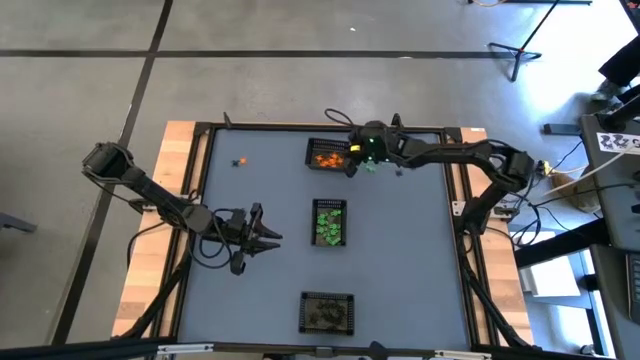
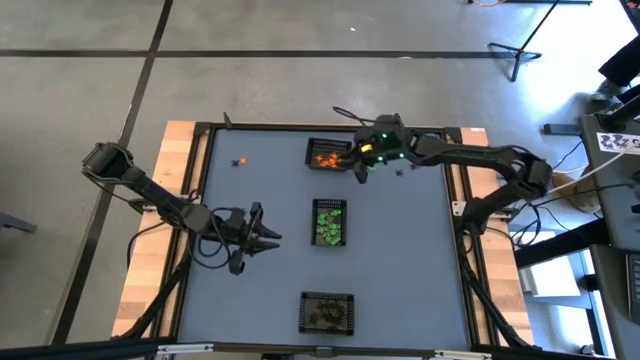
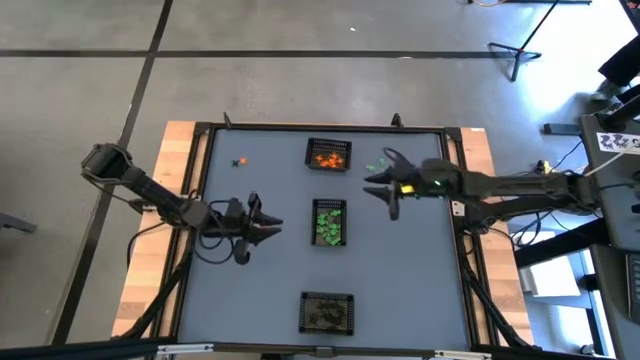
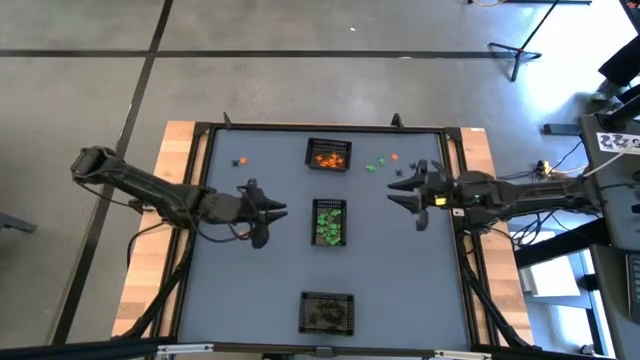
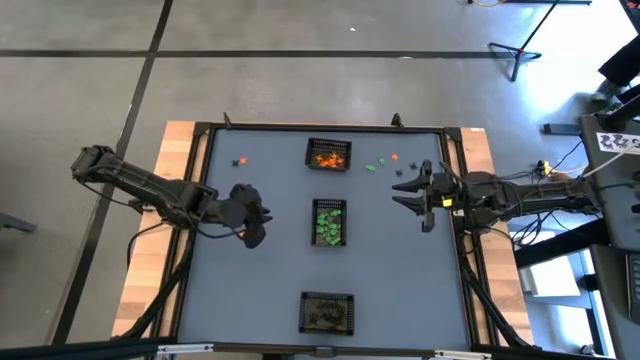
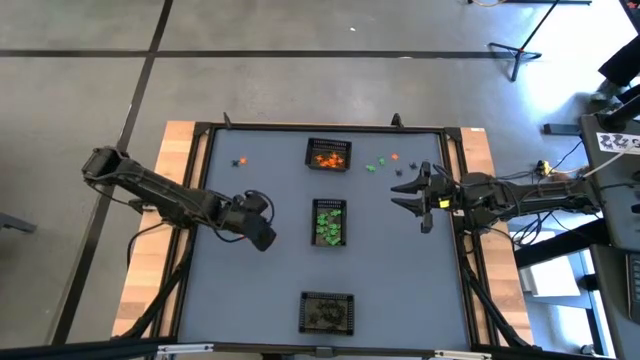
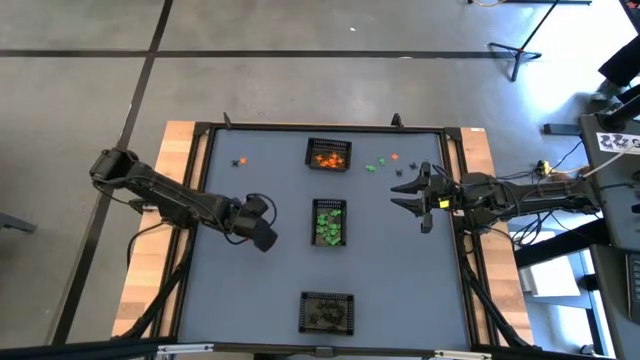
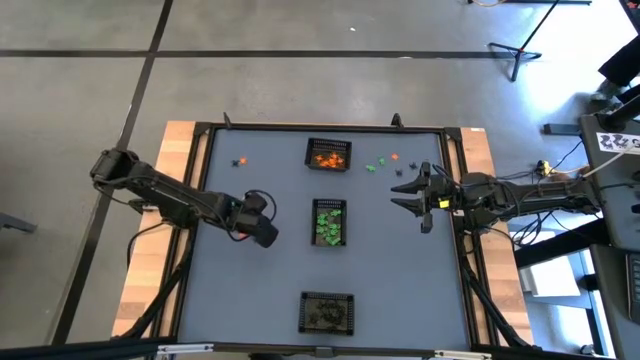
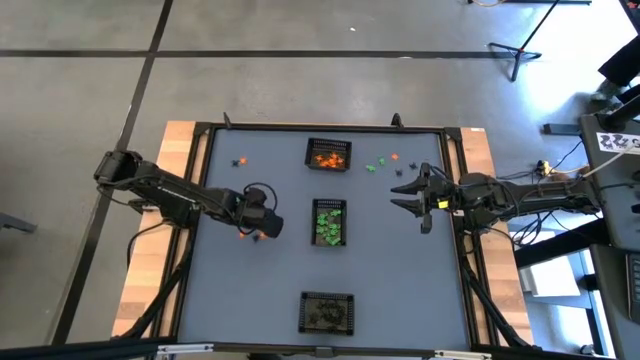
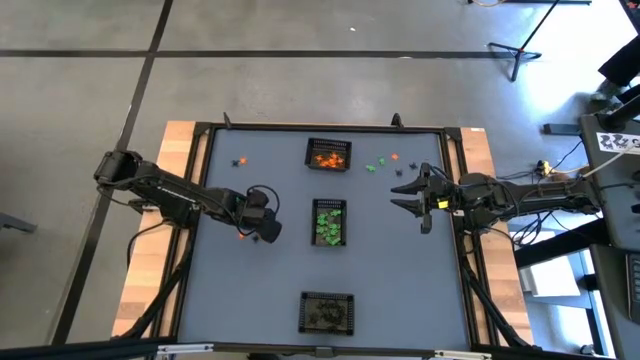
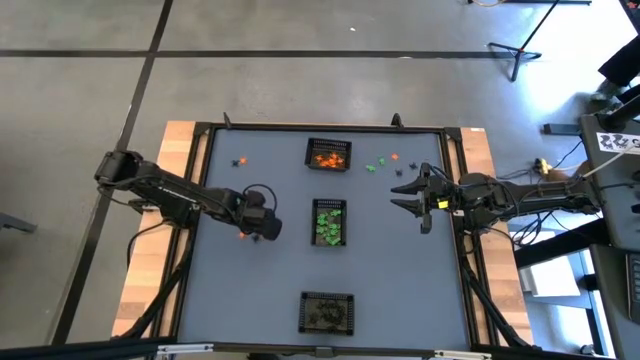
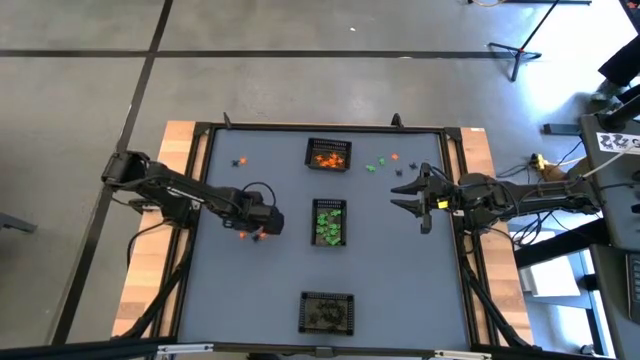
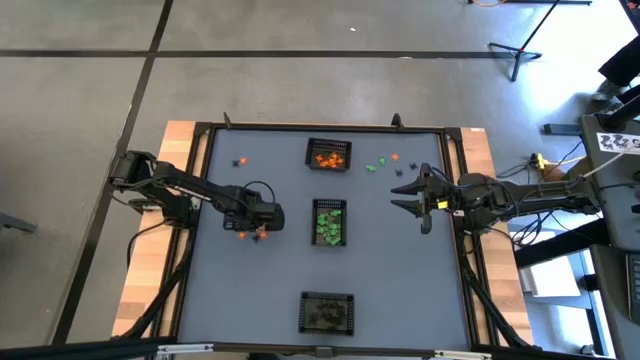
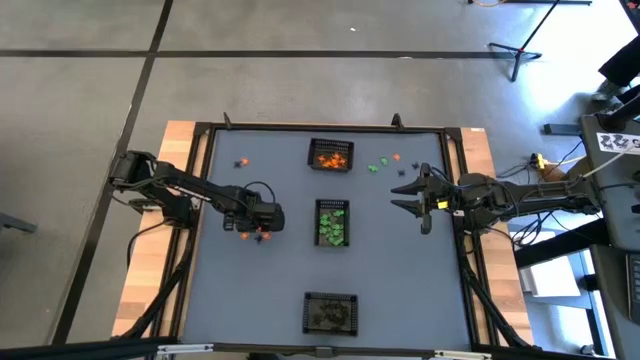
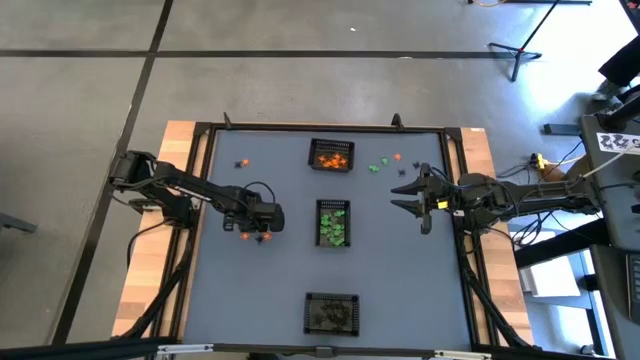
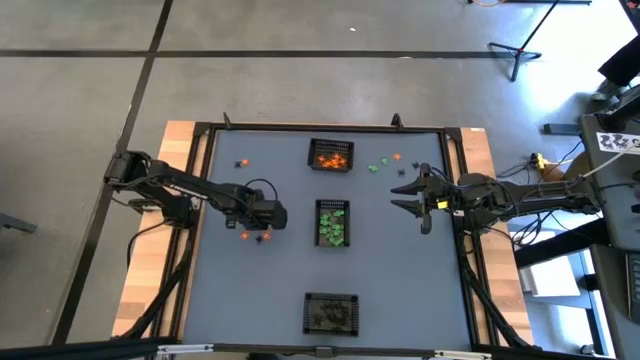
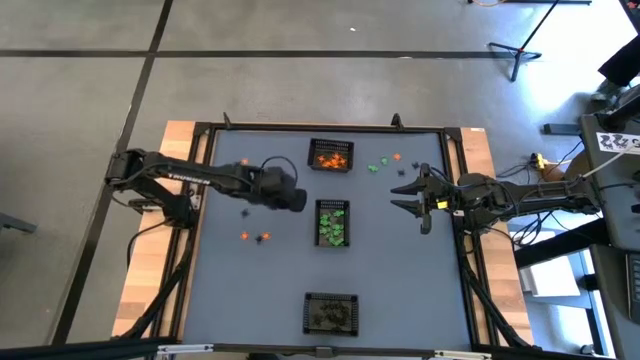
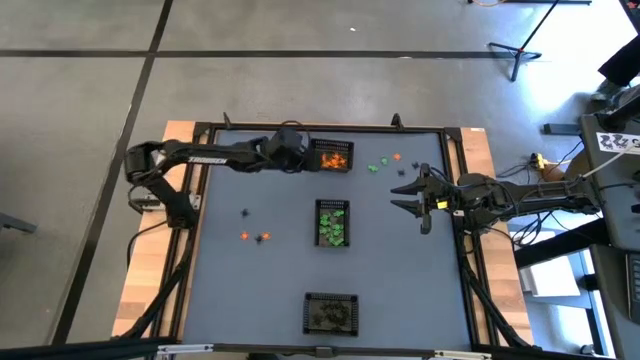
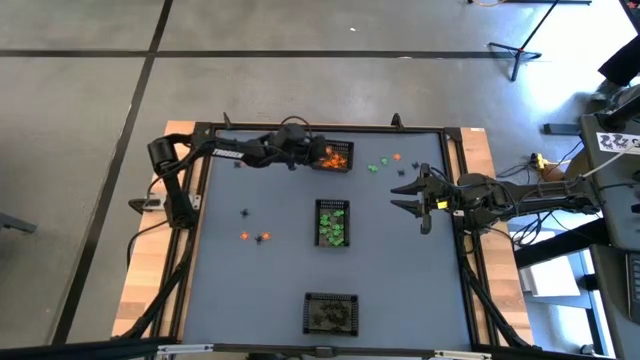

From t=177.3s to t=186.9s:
Task: Sort Halloween decoration
Put the orange spider toy into the top black bin

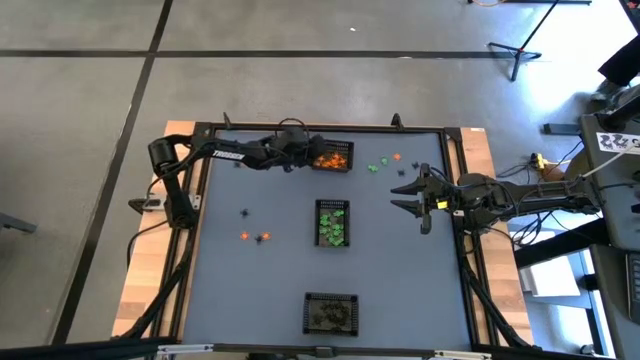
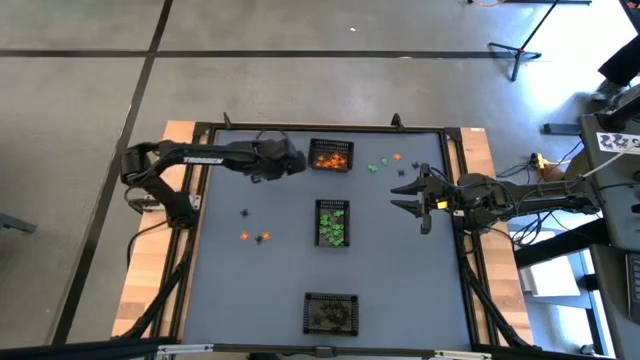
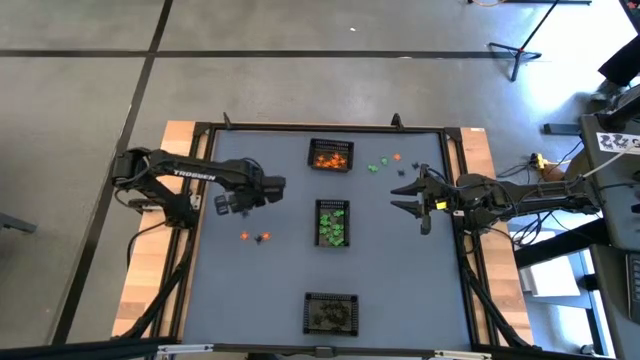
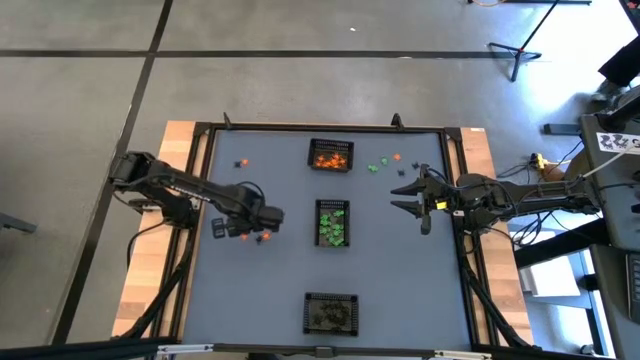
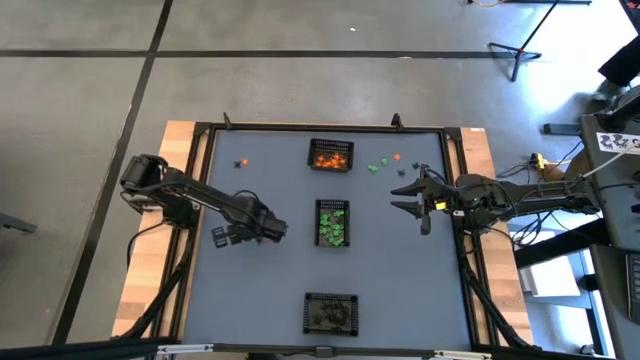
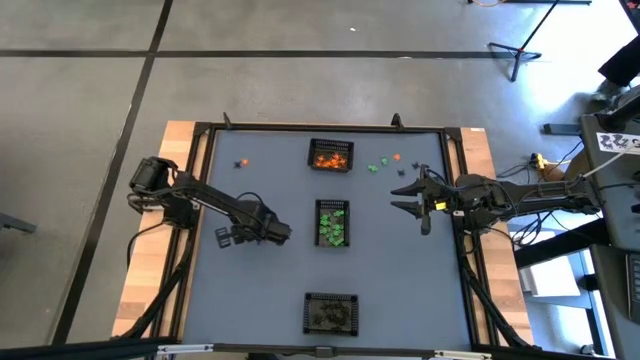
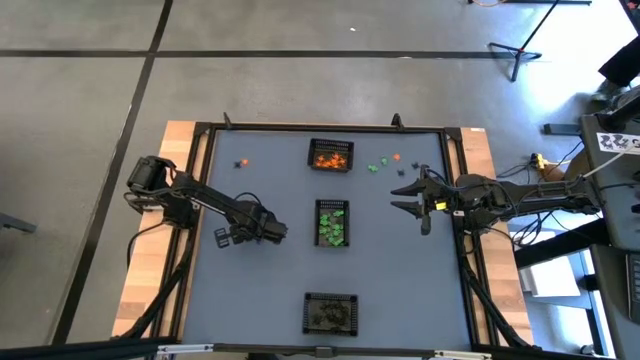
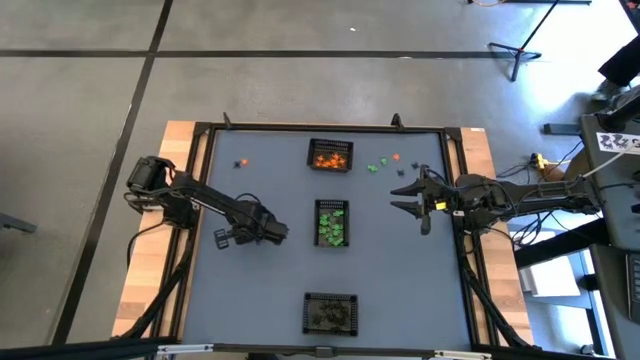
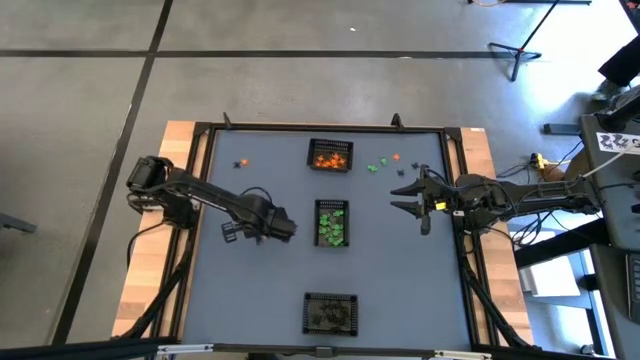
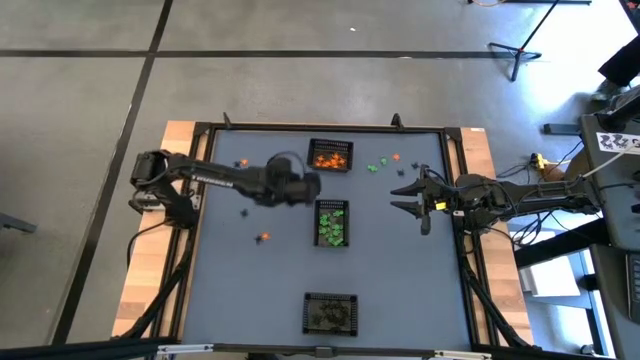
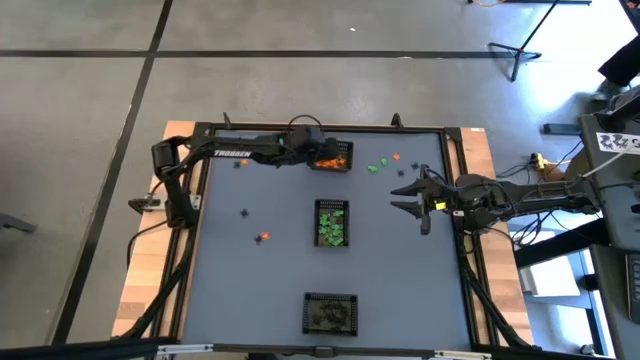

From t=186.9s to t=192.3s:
Put the orange spider toy into the top black bin

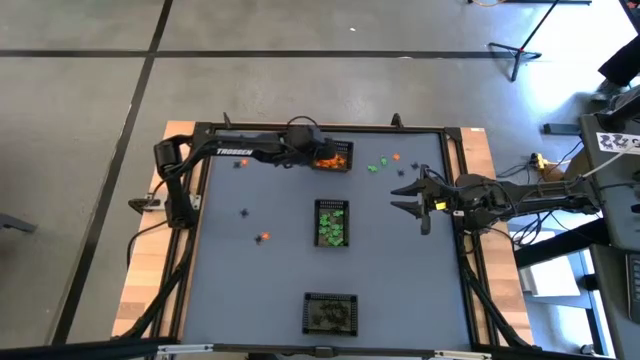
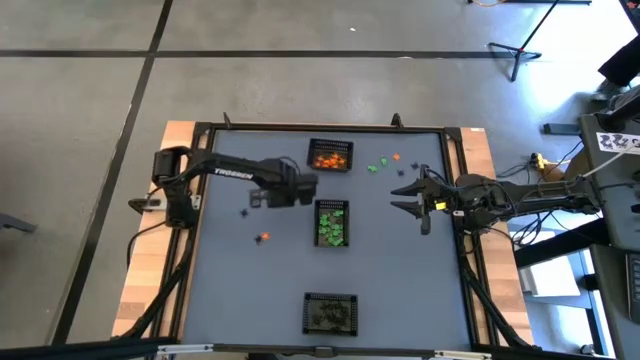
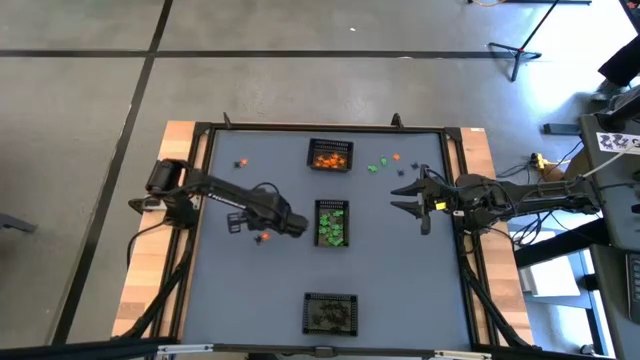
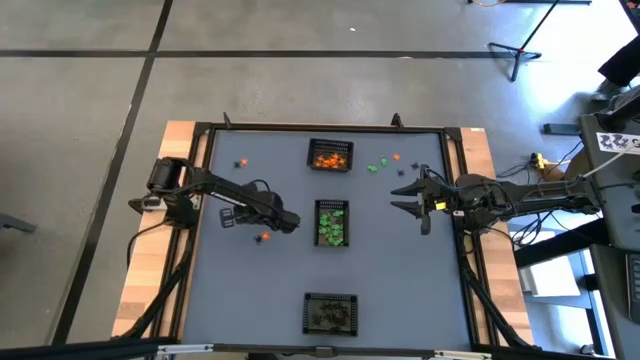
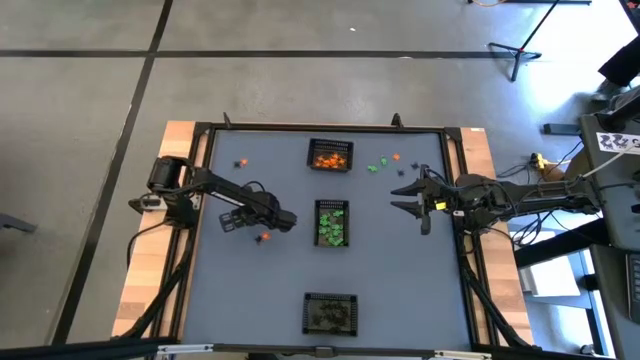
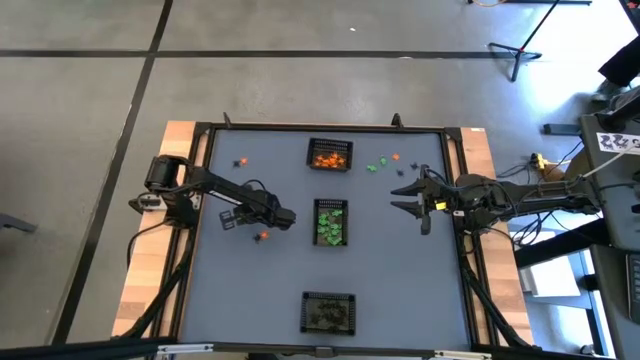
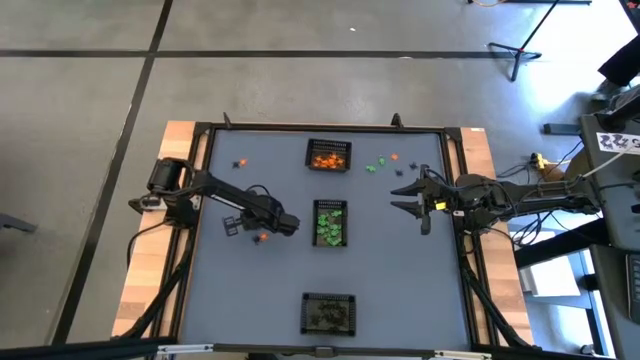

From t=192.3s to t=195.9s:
Put the black spider toy into the bottom black bin

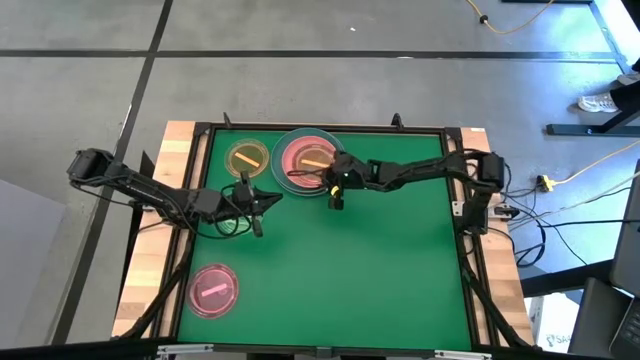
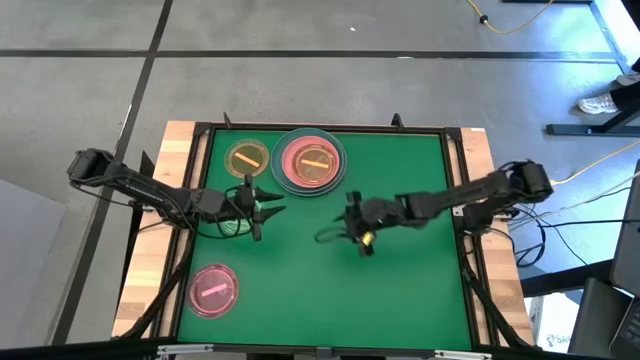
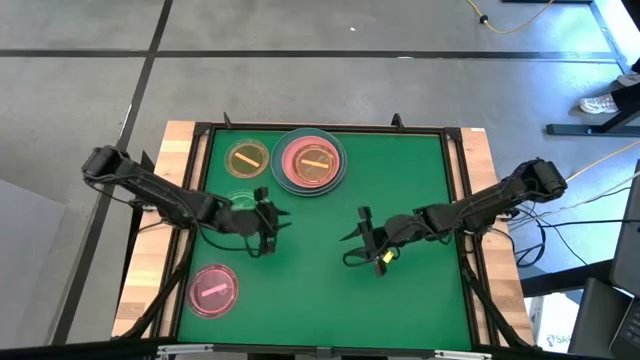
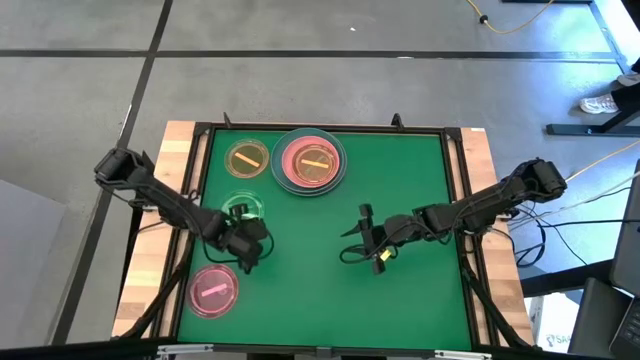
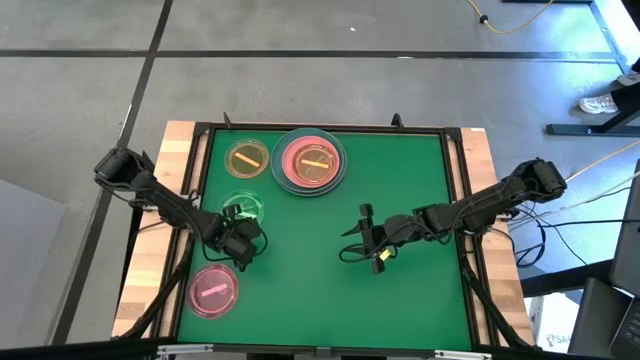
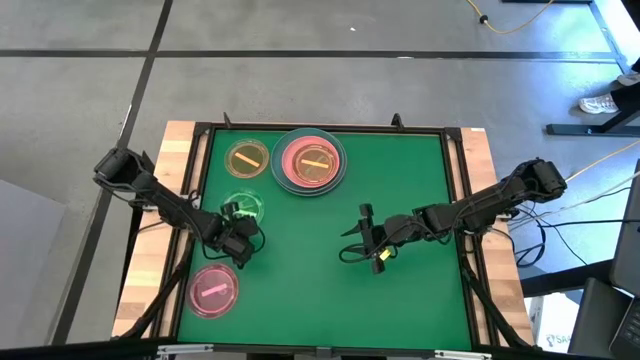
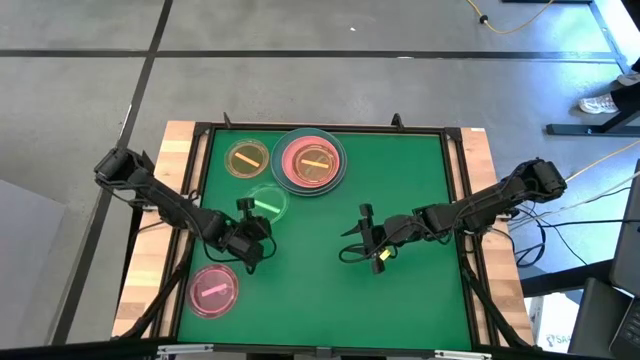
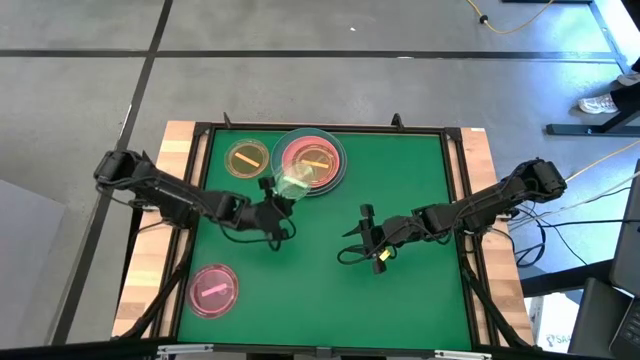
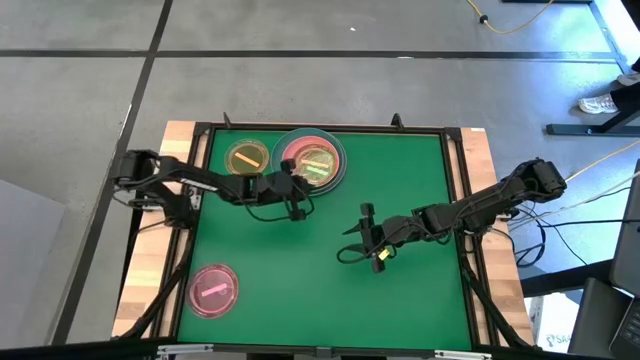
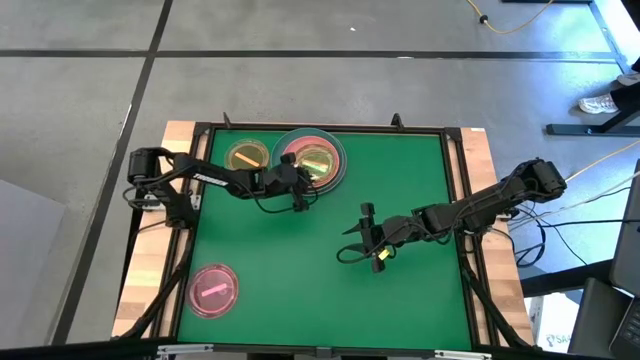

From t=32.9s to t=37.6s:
Task: Stack plastic plates
Stack the light green plate on top of the orange plate
